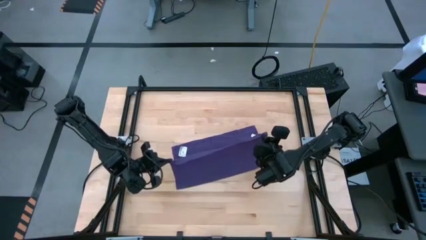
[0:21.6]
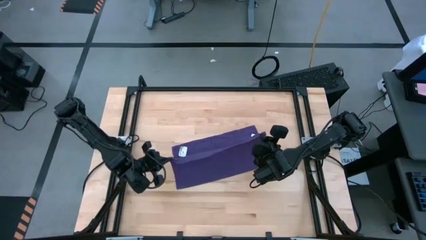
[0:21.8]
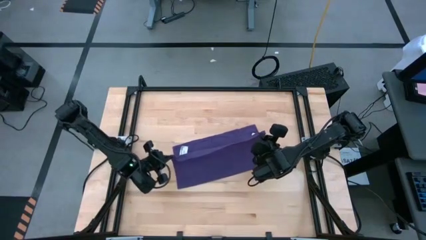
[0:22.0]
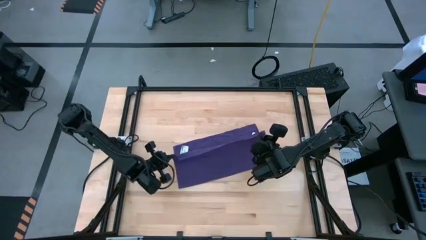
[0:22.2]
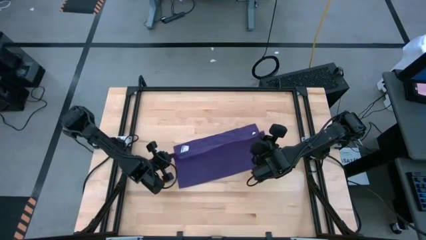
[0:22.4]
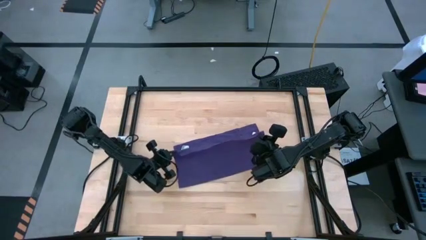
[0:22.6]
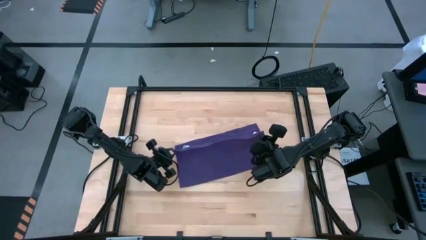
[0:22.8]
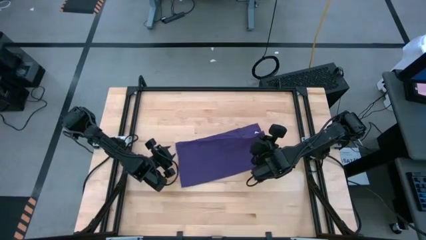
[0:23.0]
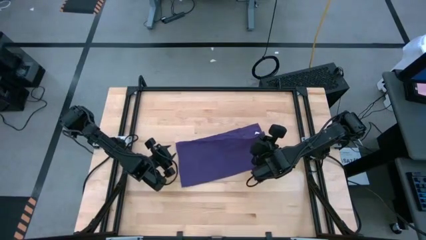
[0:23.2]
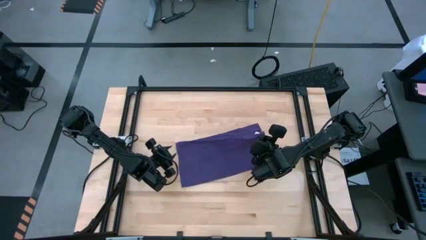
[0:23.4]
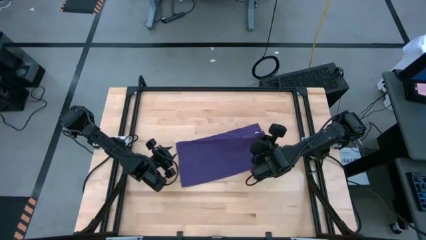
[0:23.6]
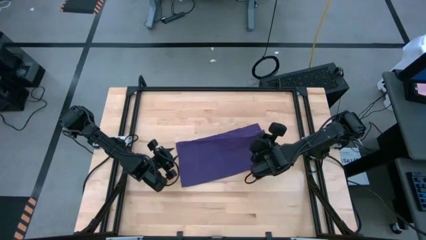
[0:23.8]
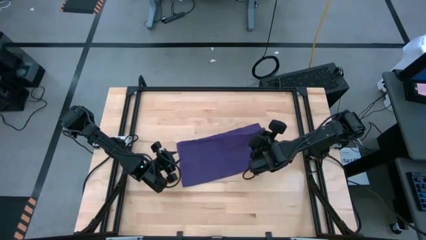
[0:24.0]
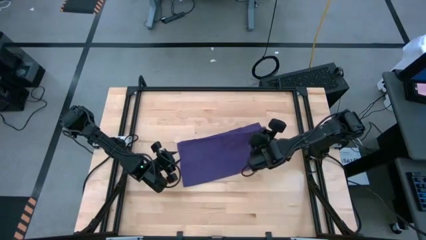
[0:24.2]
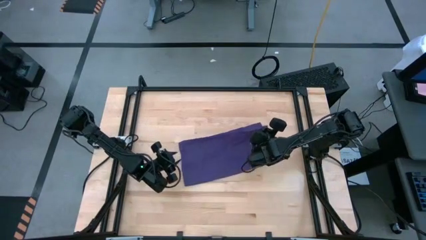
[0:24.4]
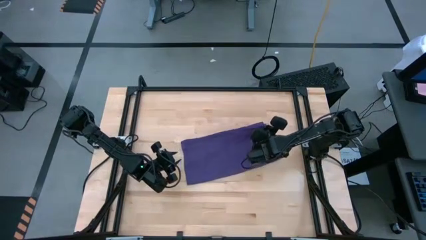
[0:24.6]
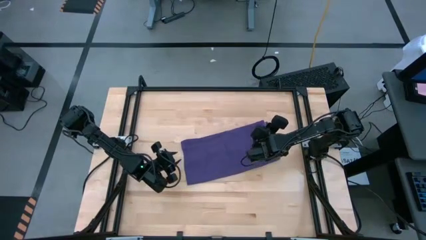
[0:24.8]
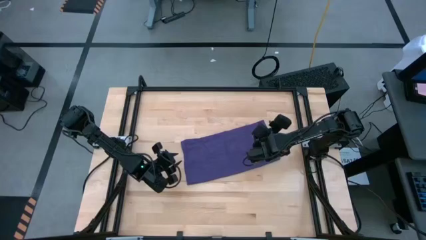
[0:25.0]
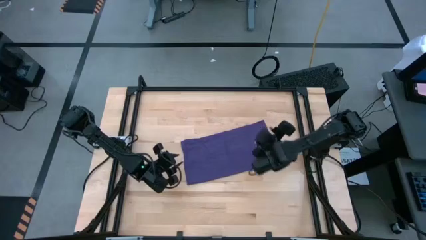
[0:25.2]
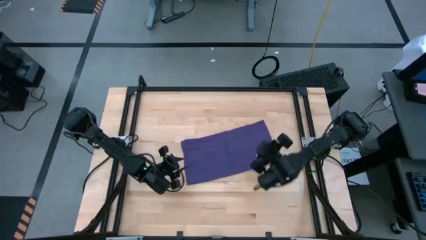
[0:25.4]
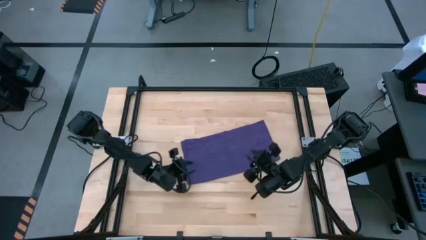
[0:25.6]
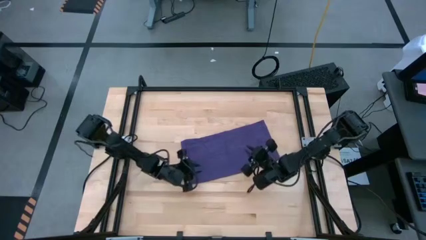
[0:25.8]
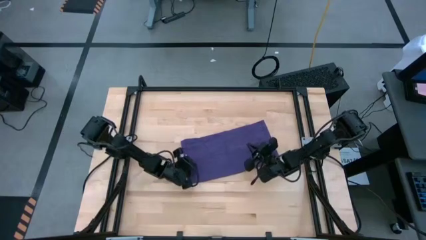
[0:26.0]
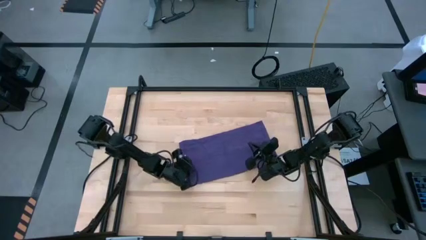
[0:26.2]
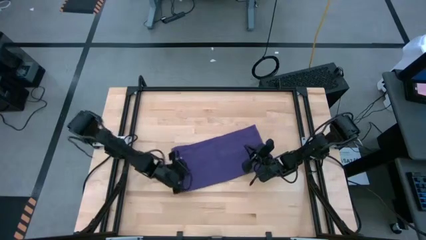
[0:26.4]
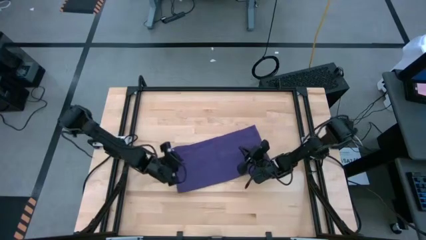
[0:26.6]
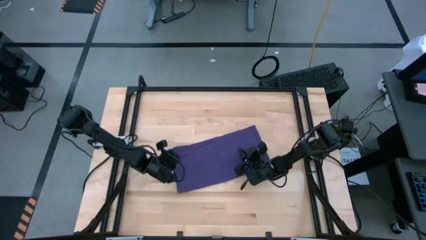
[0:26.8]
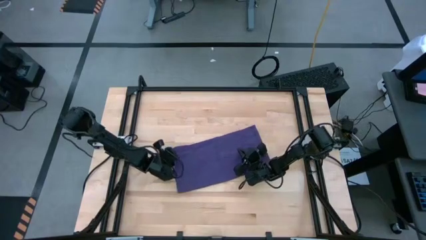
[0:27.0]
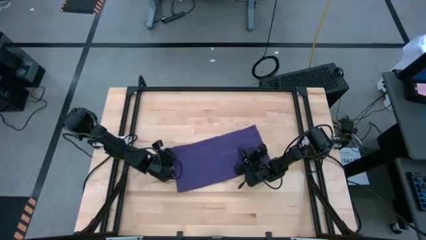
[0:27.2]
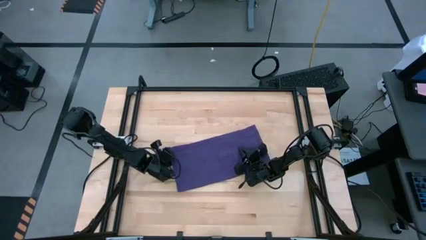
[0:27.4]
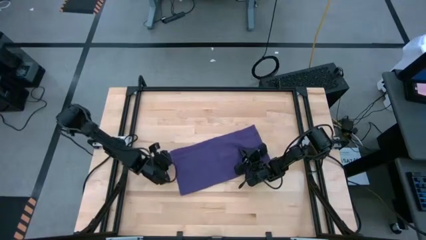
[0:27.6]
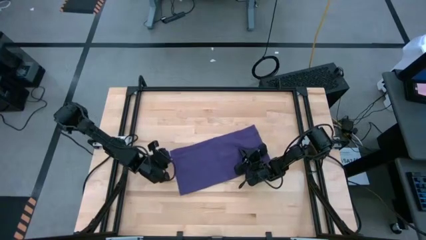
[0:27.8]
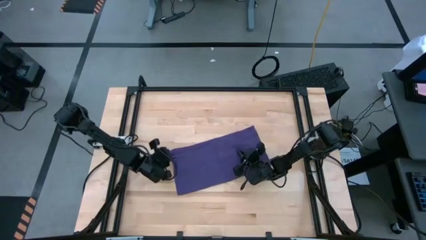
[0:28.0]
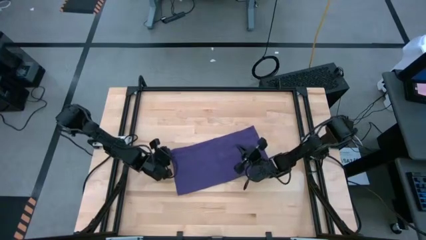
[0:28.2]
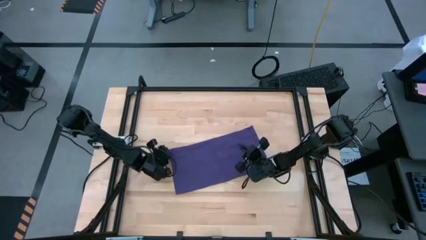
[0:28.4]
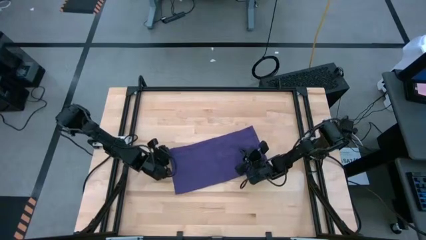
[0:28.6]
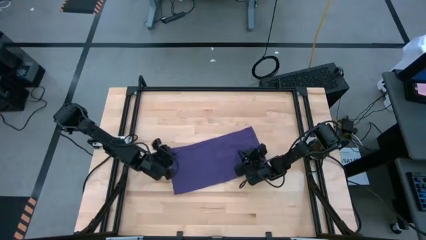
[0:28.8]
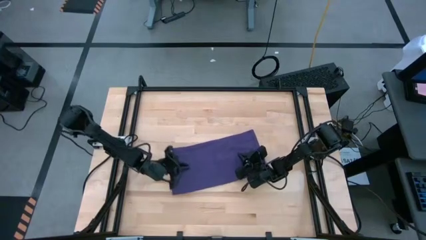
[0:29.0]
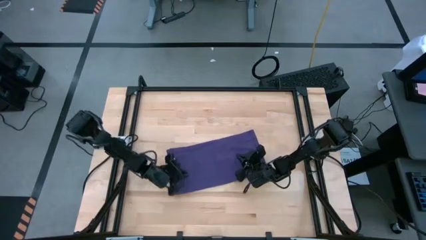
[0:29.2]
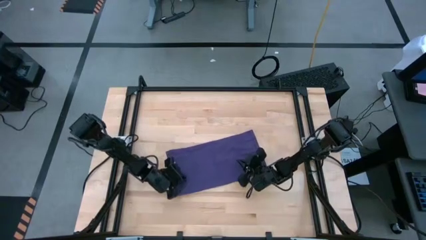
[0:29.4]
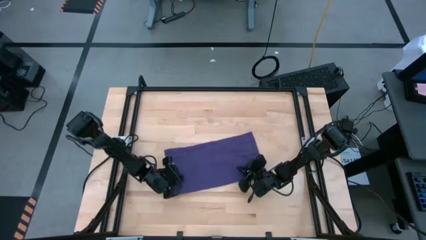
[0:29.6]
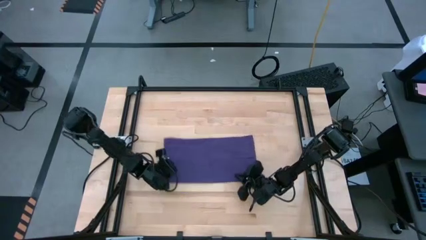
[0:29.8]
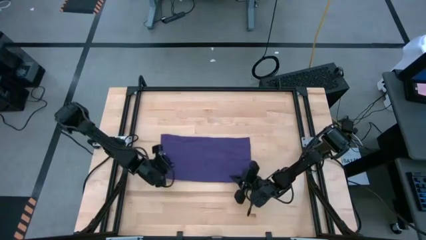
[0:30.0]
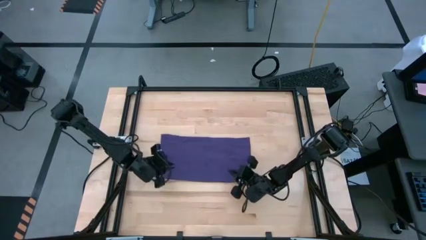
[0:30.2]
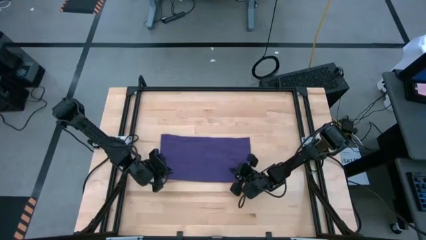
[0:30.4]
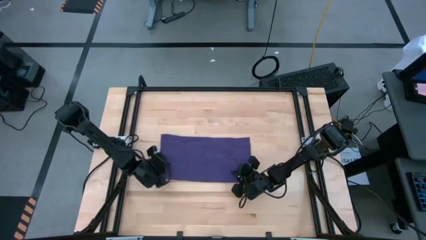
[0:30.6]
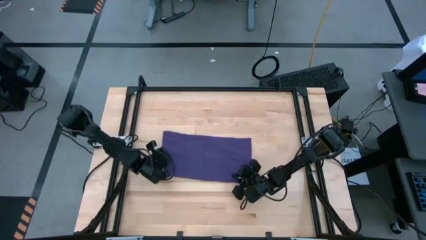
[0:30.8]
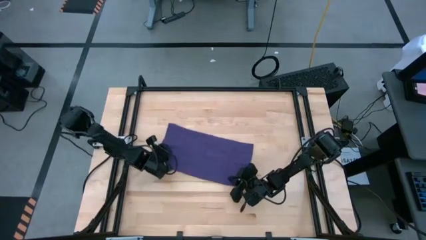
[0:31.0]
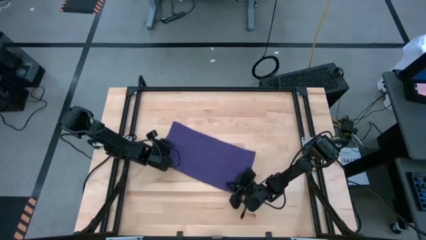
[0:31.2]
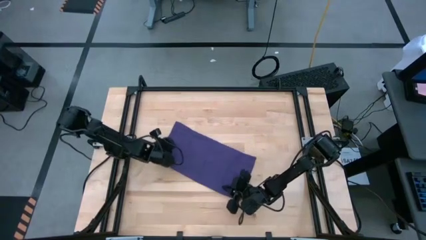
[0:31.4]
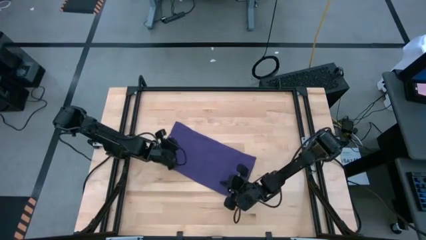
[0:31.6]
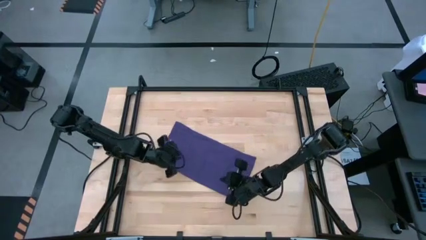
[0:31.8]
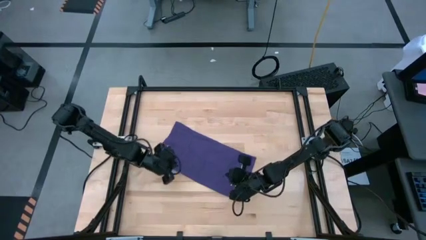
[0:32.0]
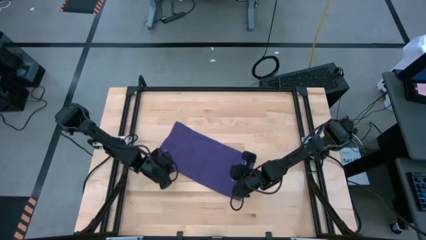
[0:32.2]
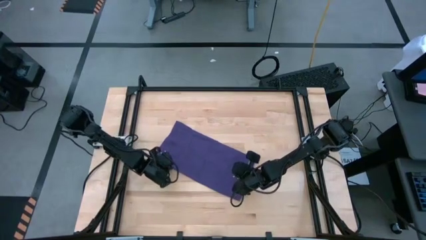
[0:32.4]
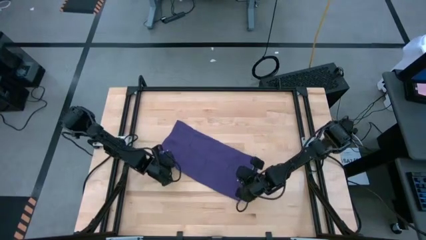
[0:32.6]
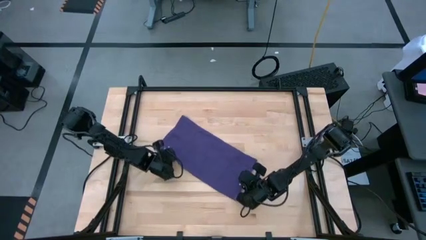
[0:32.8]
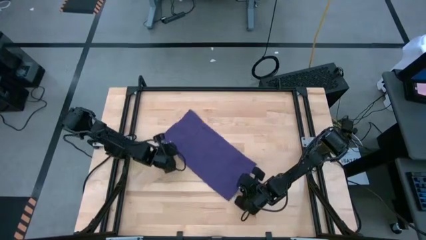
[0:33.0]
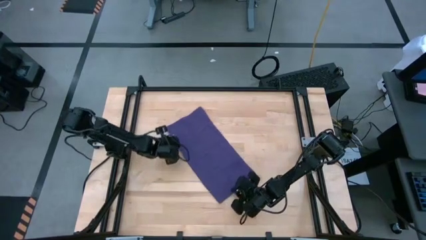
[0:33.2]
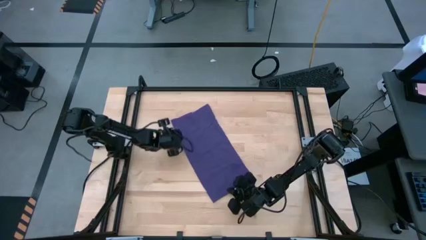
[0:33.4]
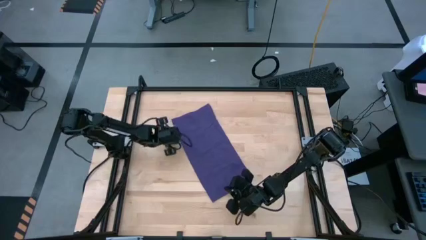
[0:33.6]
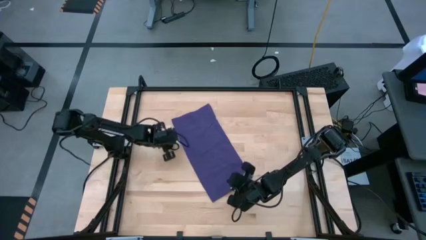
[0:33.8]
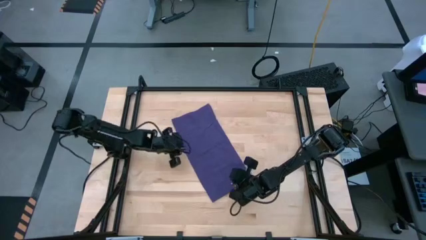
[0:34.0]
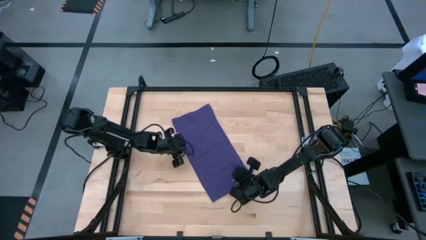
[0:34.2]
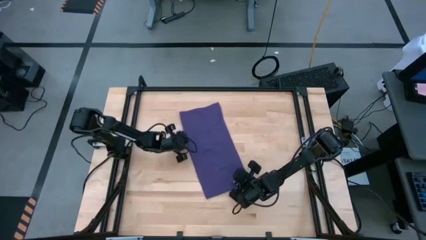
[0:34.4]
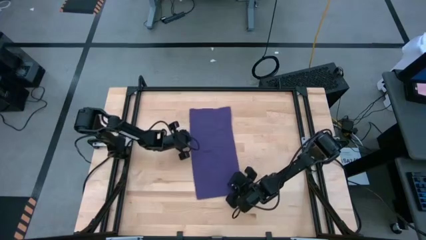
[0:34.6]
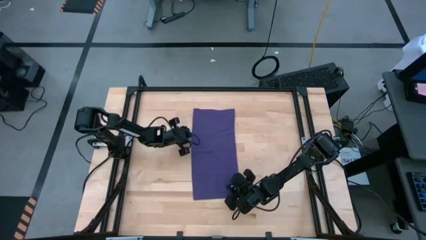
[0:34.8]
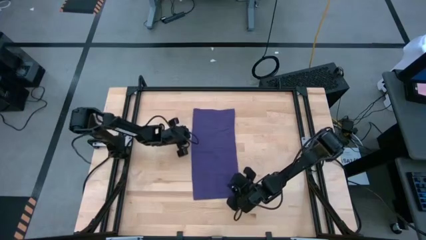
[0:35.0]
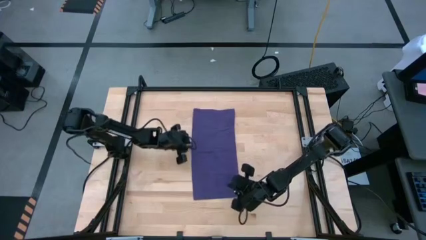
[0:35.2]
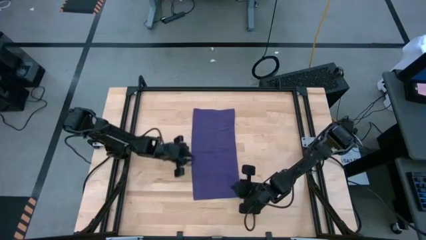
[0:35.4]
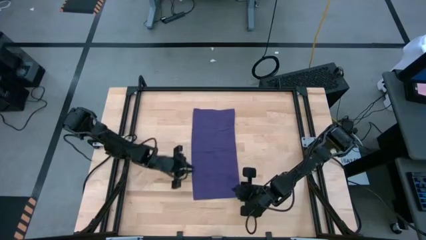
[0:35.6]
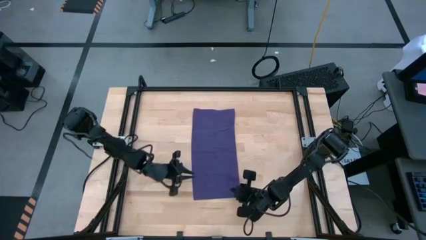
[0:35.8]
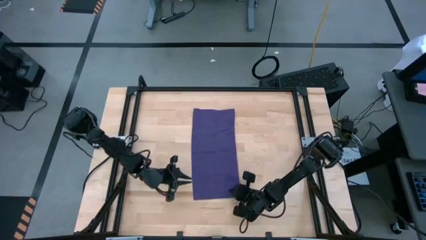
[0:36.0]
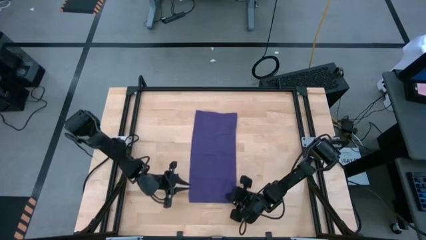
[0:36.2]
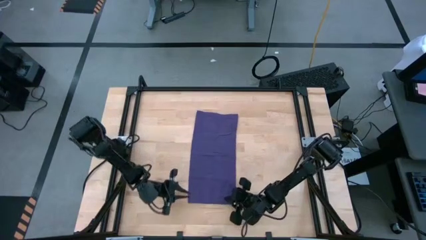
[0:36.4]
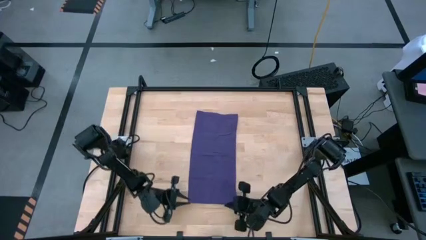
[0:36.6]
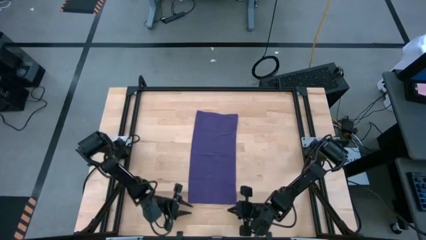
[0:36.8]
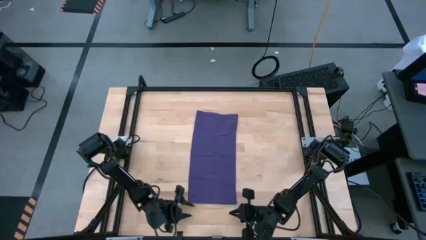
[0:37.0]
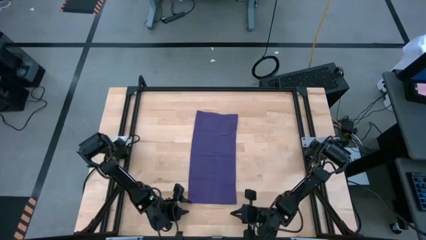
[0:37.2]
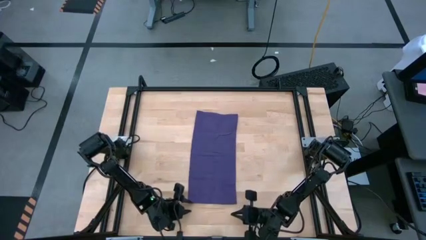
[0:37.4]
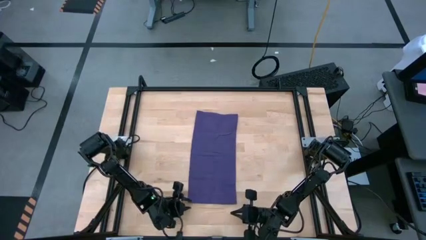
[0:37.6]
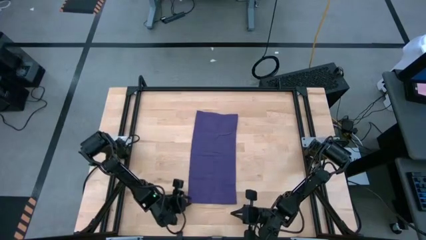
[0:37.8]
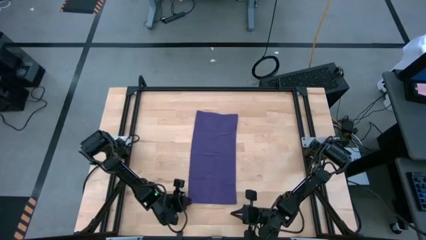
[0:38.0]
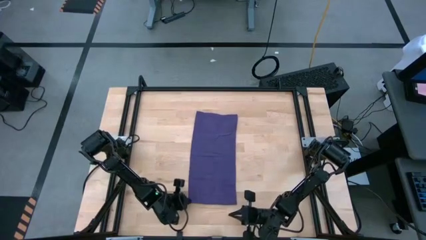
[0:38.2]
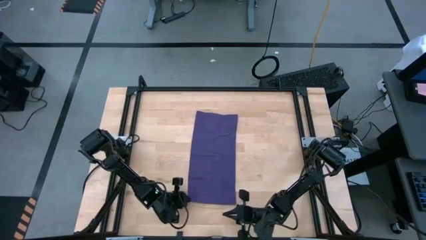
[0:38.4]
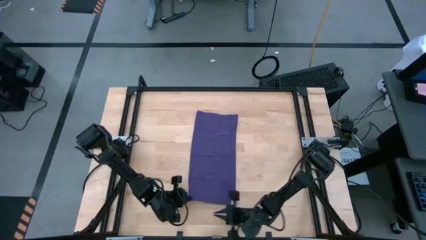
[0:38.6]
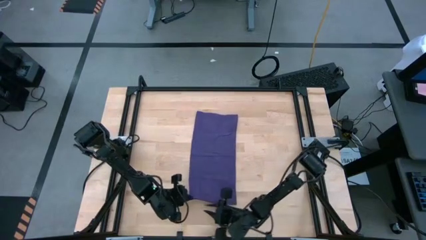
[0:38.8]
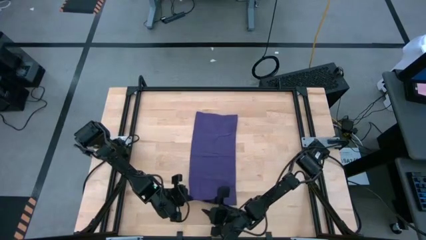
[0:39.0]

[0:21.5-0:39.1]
Task: Roll towel
Roll the purple towel
